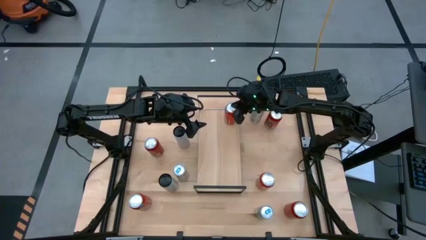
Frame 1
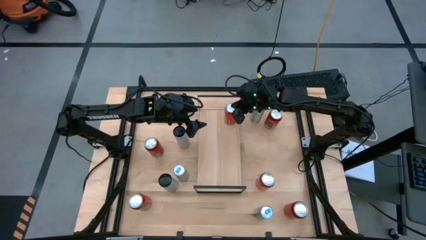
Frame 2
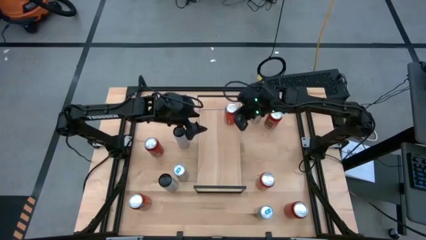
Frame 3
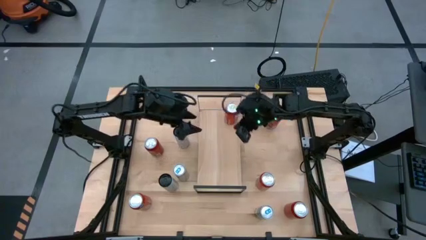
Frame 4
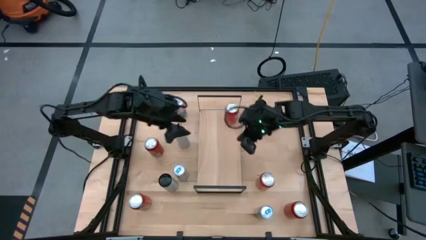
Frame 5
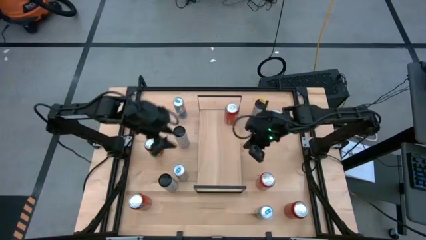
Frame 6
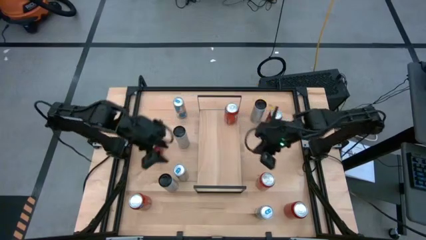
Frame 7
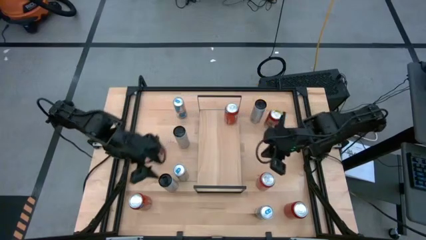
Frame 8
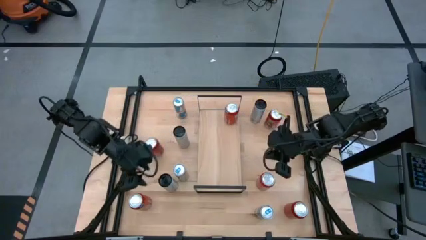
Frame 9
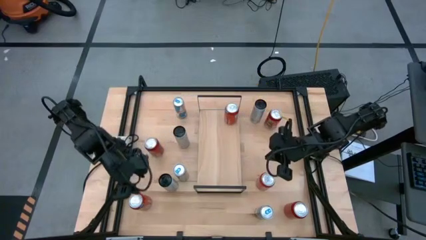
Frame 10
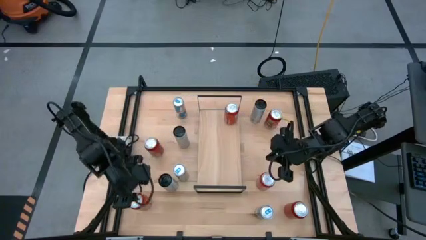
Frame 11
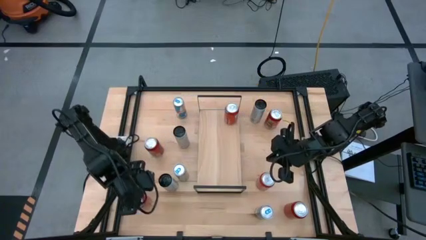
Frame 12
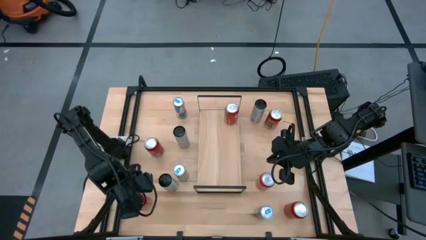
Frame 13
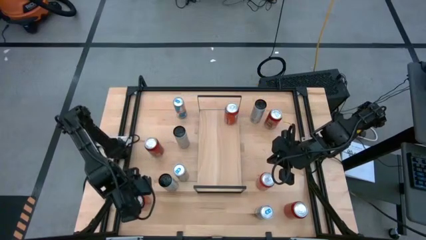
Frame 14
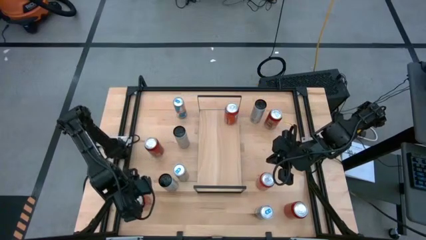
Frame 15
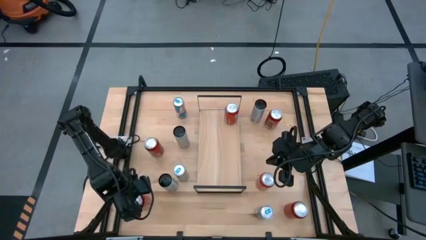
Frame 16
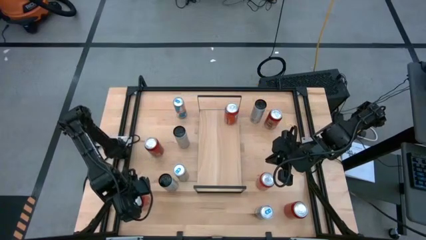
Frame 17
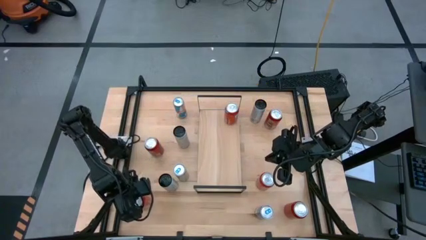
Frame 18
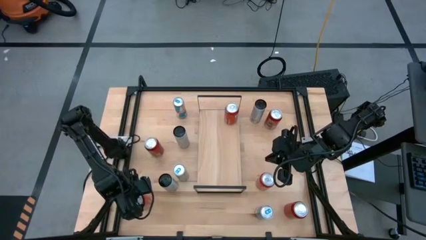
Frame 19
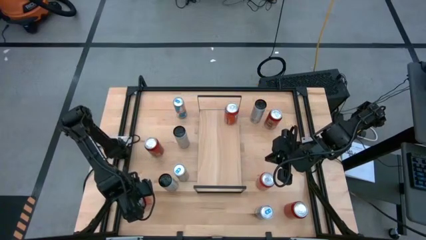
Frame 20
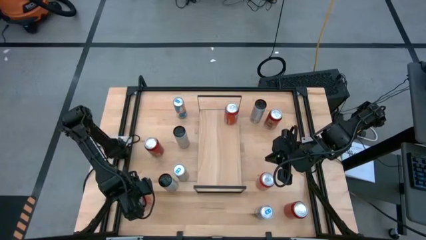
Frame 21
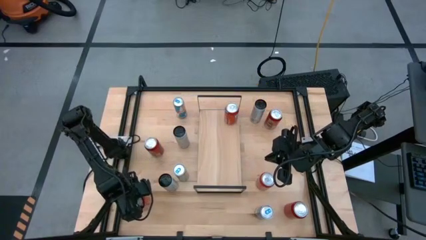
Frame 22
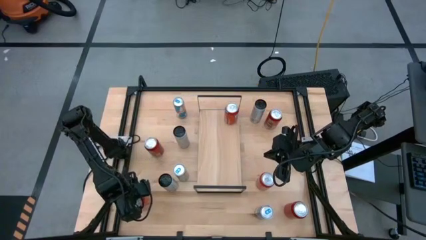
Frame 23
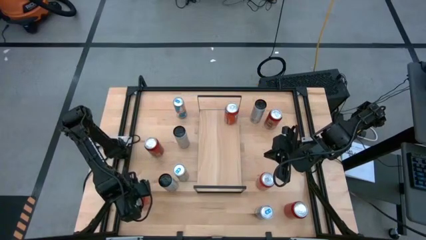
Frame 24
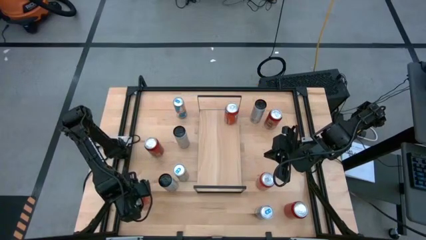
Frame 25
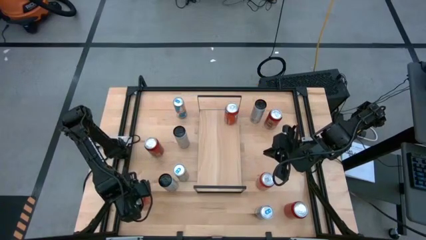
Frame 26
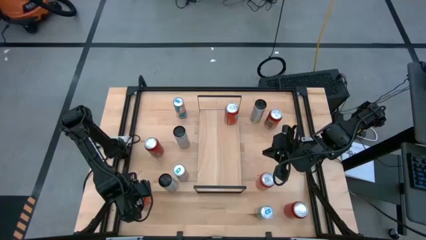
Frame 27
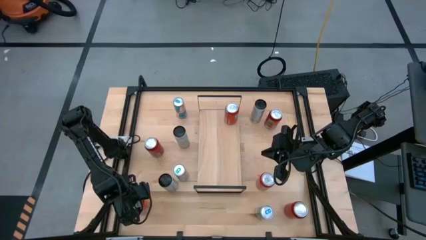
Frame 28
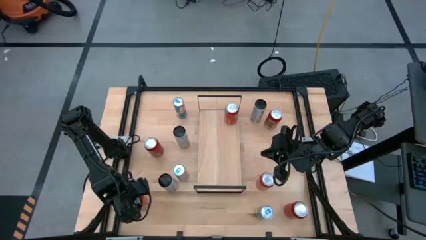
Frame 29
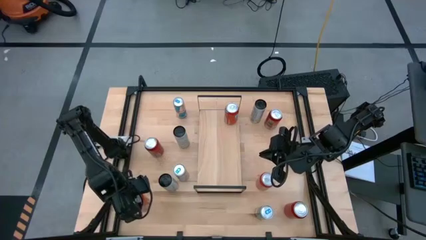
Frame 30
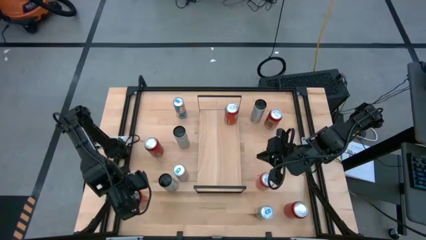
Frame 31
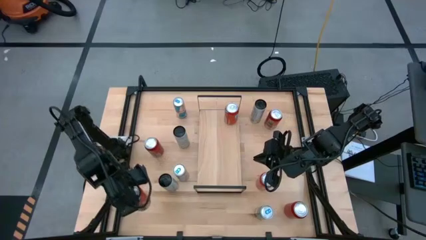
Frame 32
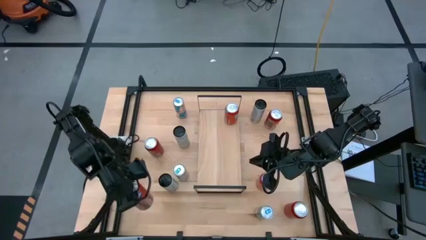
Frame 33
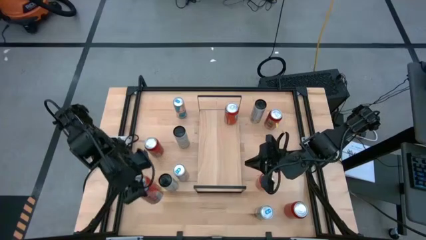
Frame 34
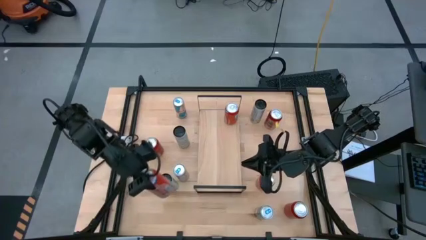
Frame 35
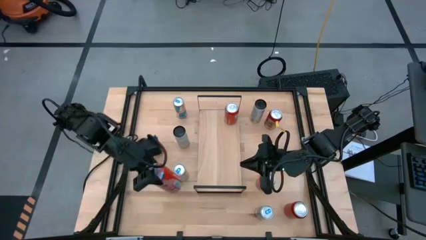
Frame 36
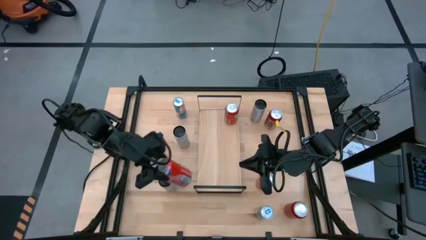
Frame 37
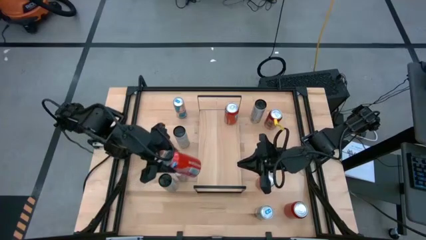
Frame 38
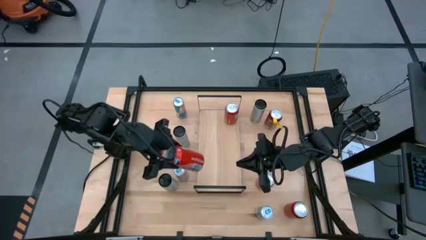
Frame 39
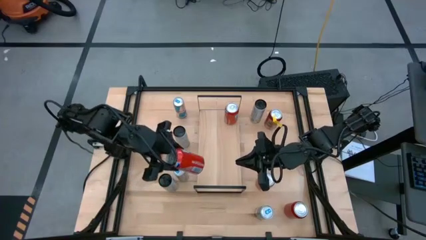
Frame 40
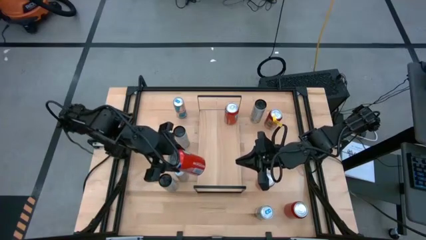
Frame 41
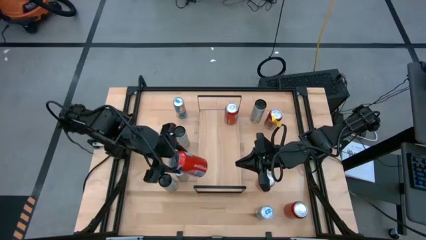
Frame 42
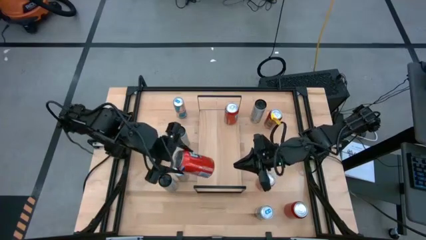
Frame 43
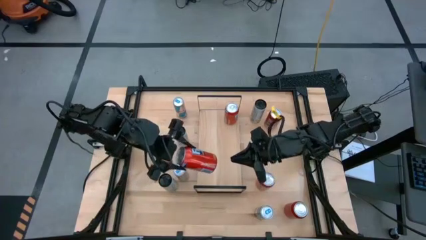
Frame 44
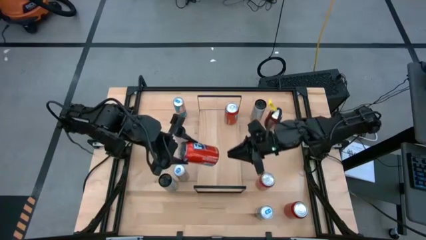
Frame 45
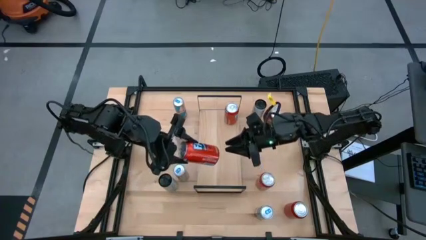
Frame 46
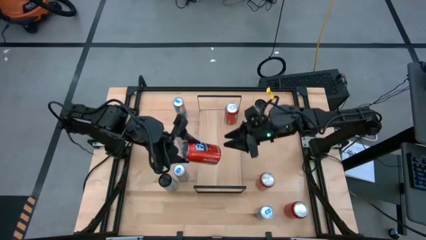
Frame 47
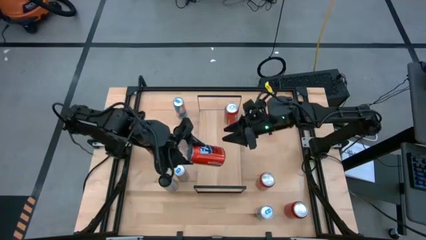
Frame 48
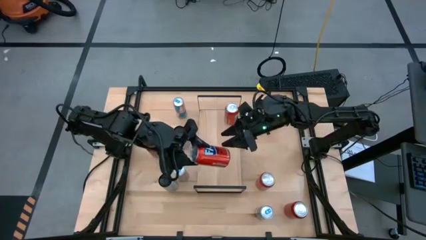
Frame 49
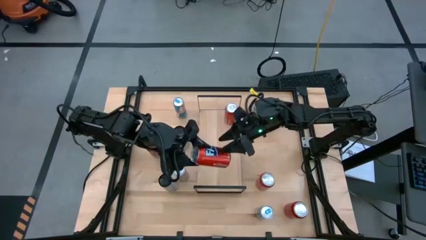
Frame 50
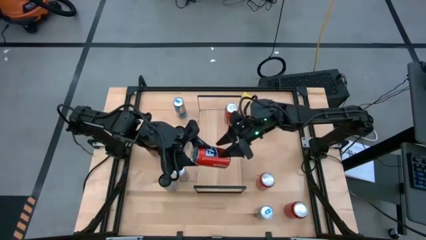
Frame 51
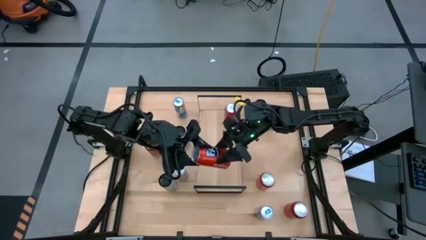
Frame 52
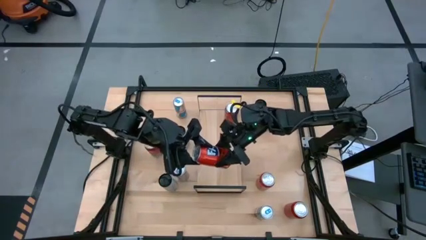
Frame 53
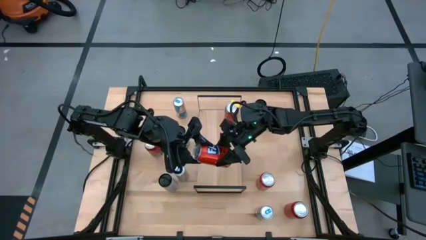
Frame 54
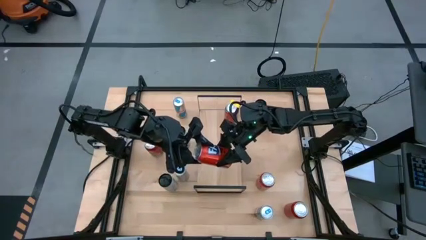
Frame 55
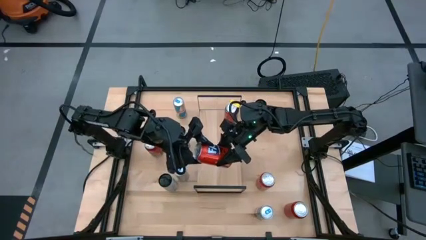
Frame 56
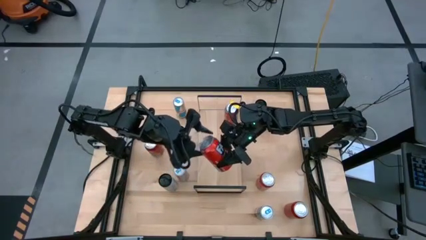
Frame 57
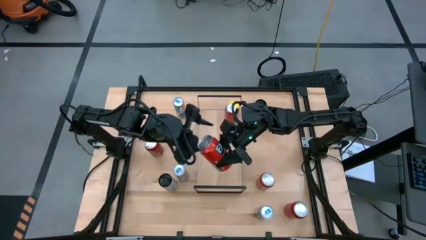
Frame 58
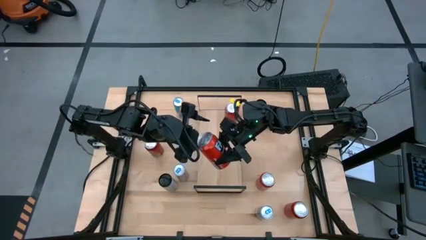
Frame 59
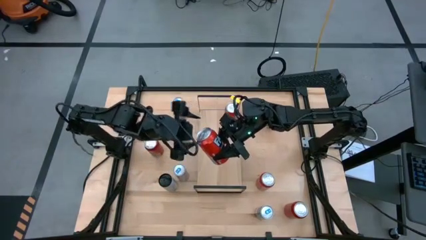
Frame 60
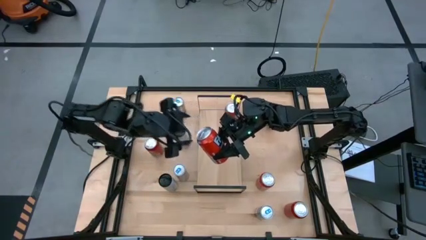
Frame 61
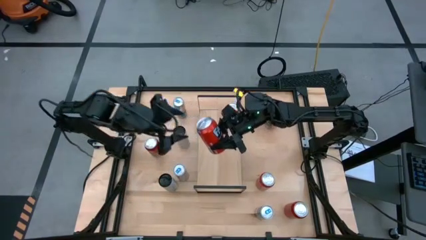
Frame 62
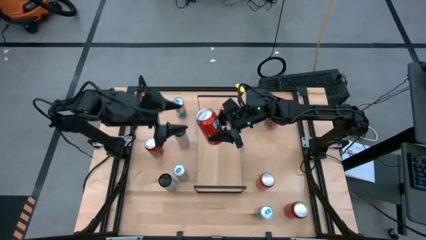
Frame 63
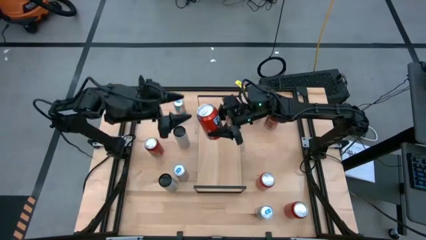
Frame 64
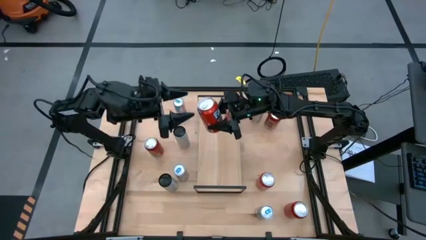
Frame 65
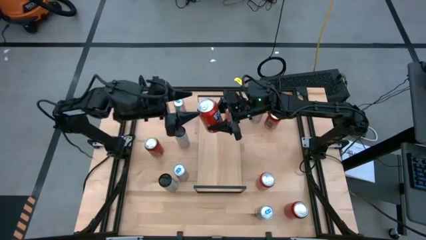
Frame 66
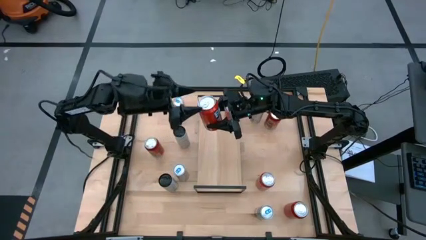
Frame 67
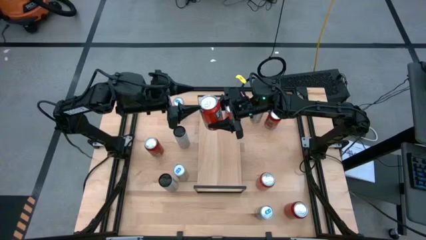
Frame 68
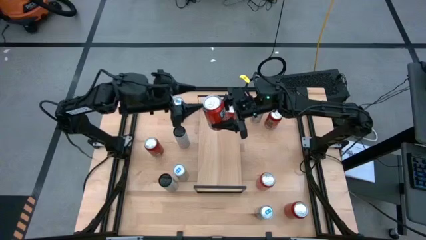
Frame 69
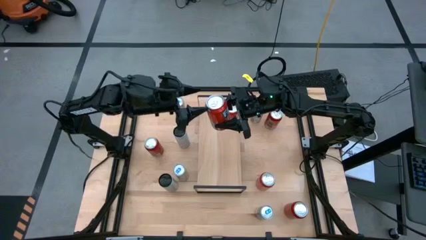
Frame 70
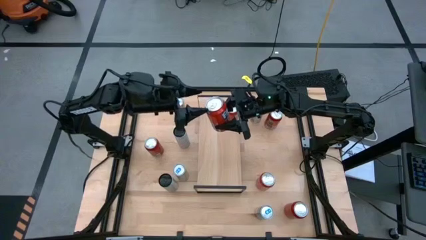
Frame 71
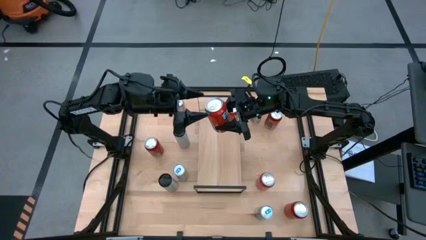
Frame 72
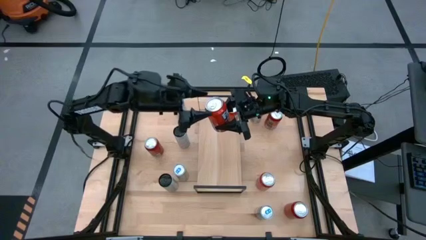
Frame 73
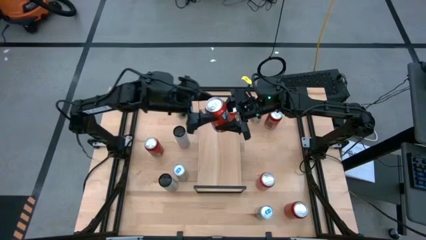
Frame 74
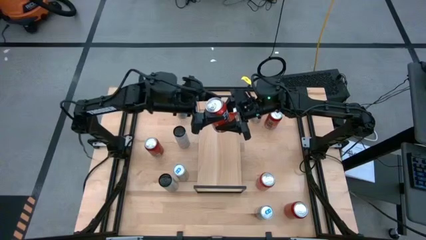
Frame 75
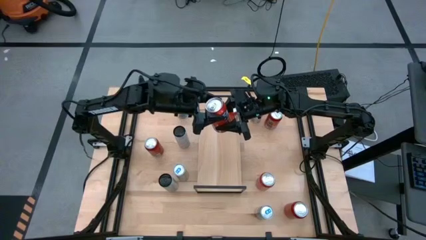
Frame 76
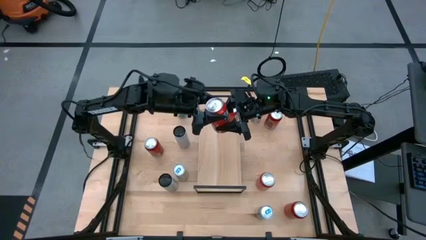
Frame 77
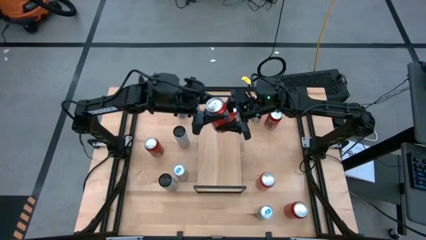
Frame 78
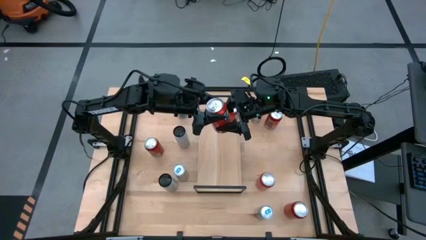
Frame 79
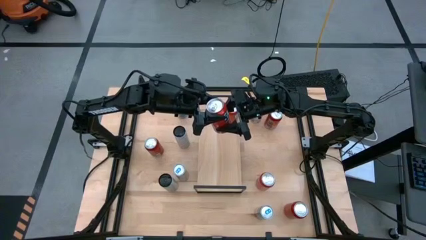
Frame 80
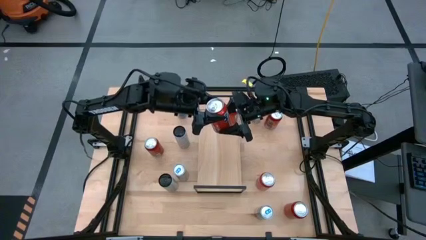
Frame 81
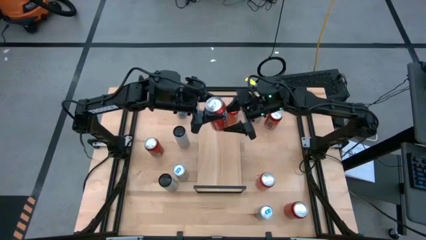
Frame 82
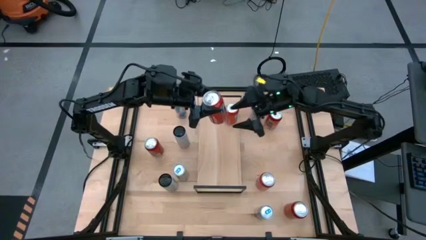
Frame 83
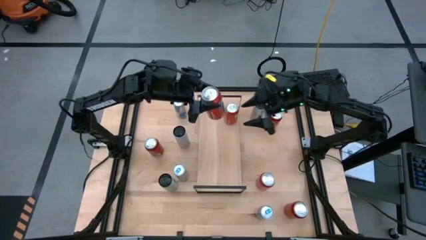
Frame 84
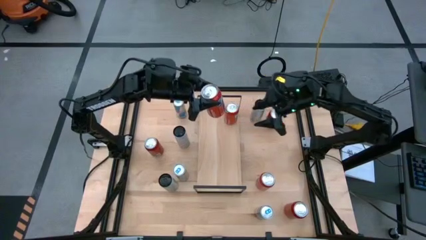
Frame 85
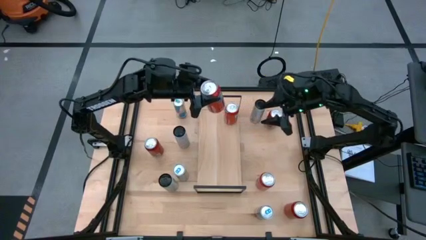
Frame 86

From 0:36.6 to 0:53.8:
Task: Place canned beverage on shelf
Put the left orange soda can on the shelf aligned with the other orange soda can
